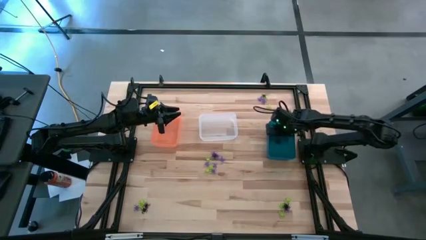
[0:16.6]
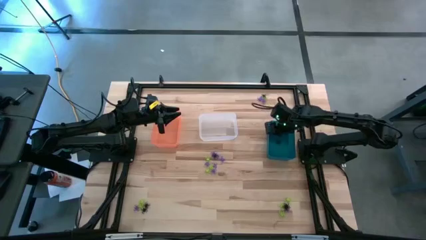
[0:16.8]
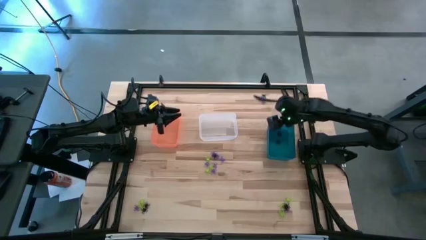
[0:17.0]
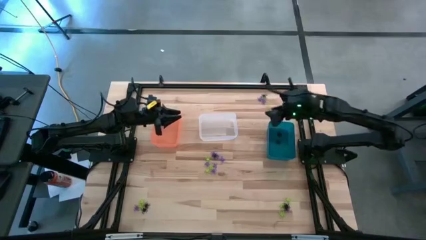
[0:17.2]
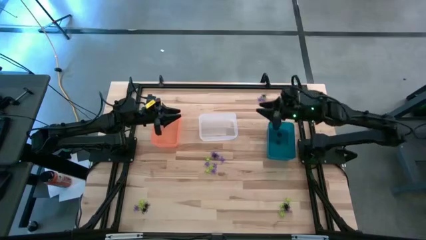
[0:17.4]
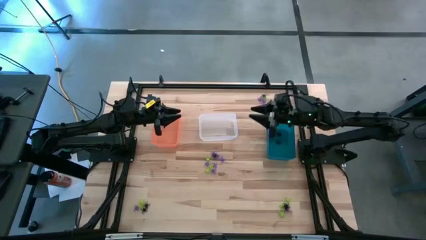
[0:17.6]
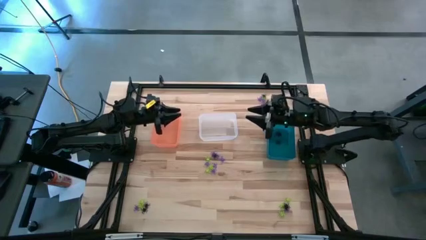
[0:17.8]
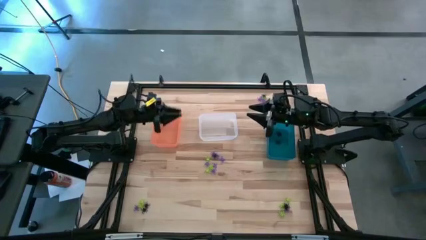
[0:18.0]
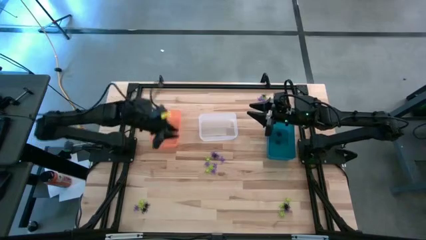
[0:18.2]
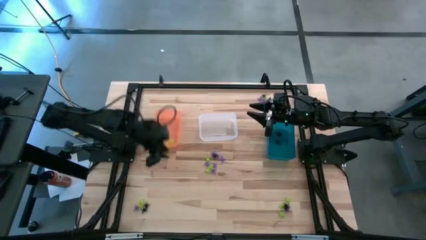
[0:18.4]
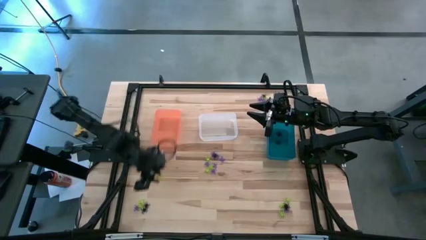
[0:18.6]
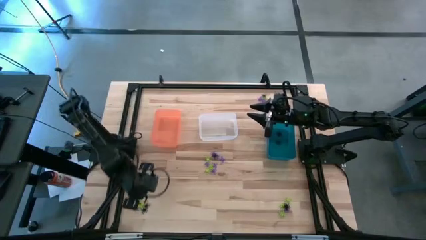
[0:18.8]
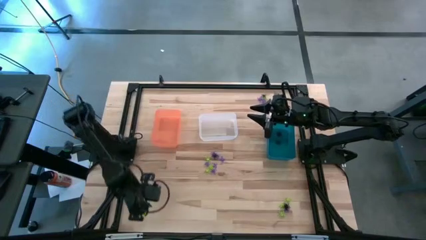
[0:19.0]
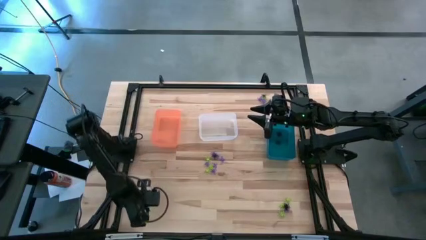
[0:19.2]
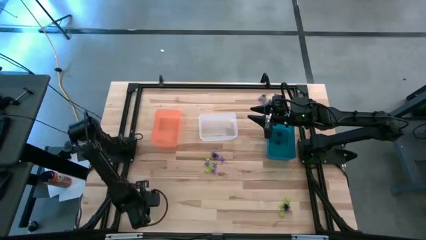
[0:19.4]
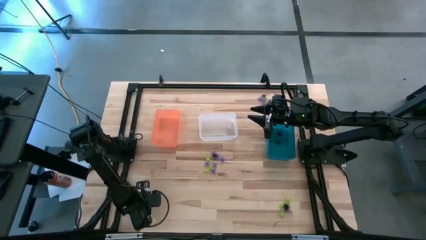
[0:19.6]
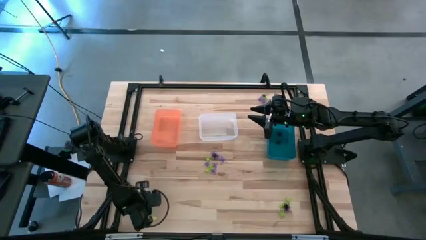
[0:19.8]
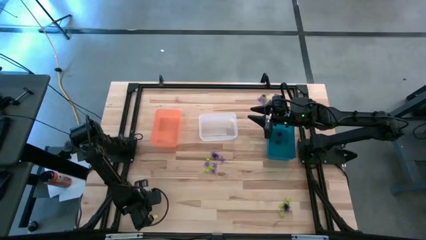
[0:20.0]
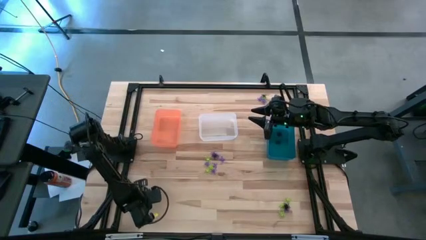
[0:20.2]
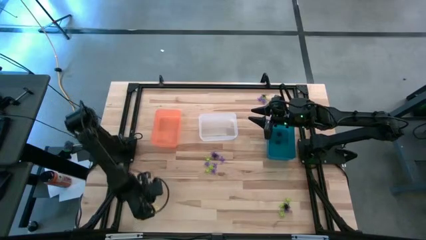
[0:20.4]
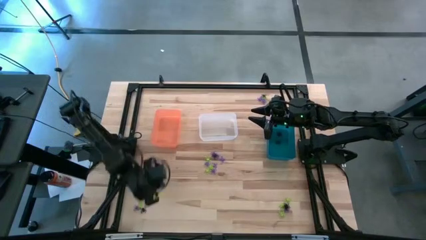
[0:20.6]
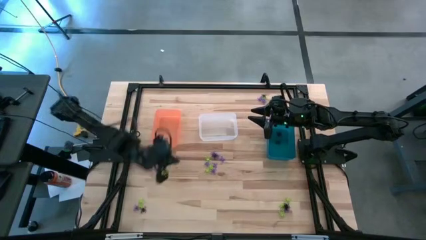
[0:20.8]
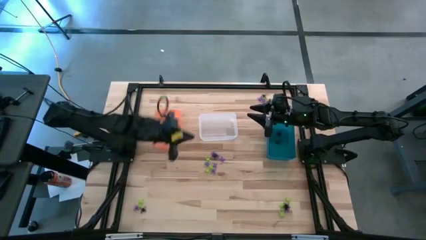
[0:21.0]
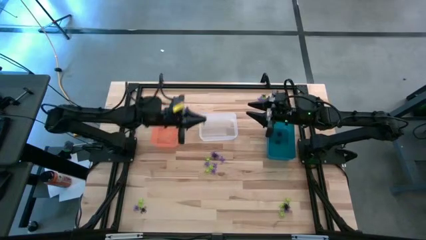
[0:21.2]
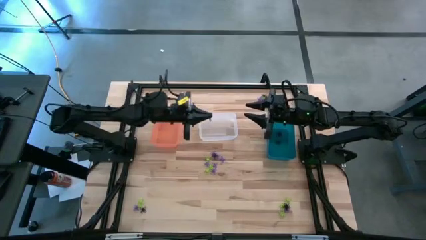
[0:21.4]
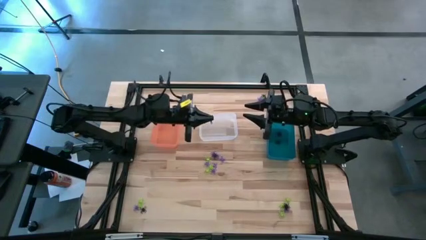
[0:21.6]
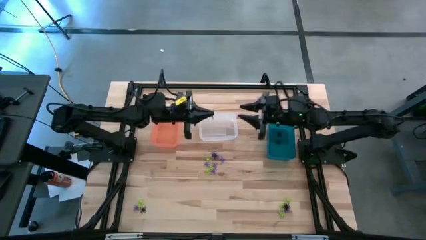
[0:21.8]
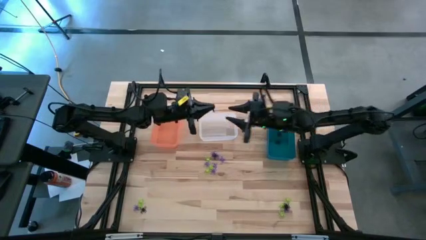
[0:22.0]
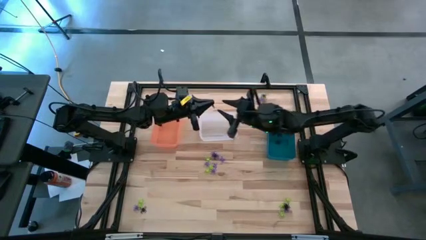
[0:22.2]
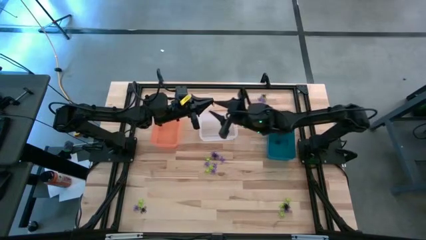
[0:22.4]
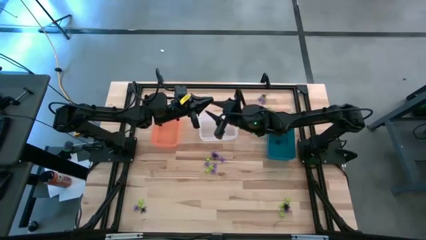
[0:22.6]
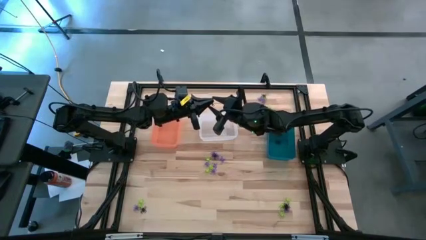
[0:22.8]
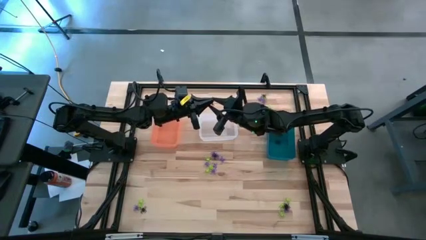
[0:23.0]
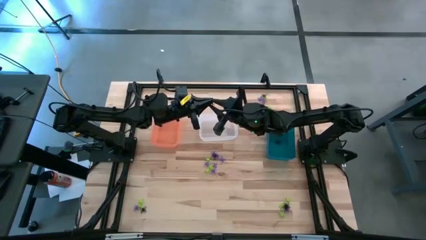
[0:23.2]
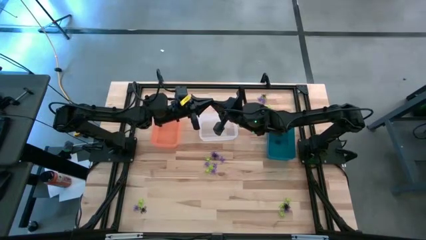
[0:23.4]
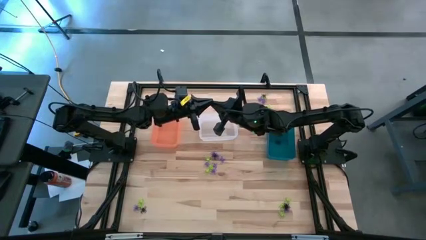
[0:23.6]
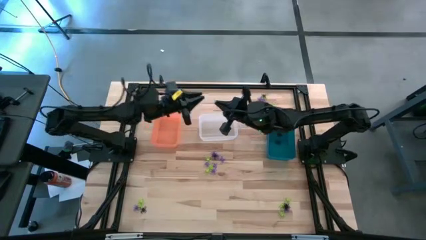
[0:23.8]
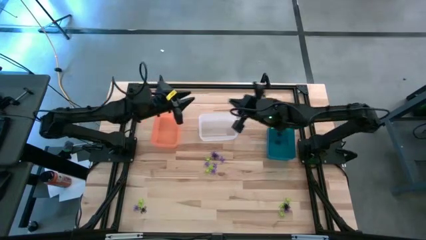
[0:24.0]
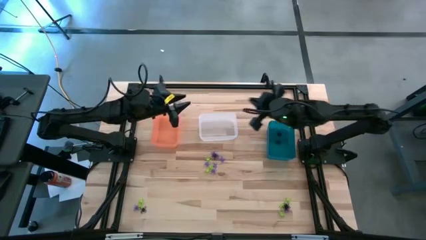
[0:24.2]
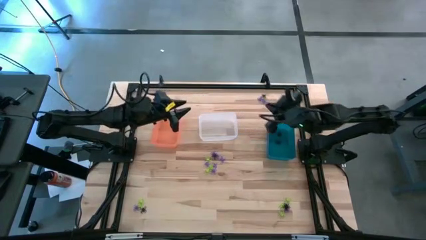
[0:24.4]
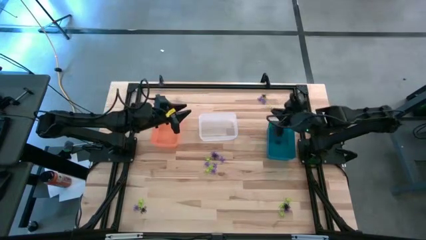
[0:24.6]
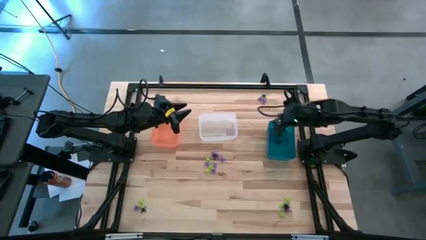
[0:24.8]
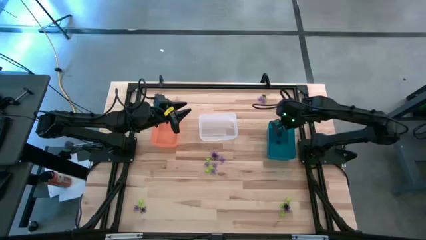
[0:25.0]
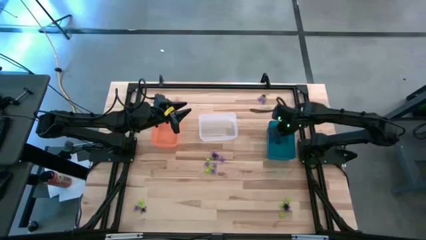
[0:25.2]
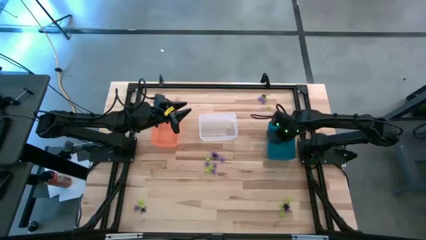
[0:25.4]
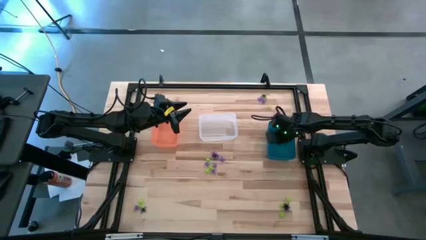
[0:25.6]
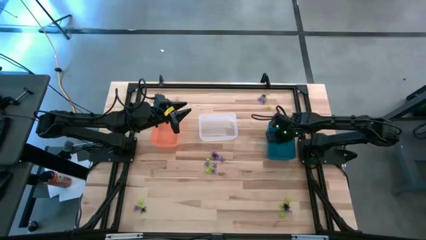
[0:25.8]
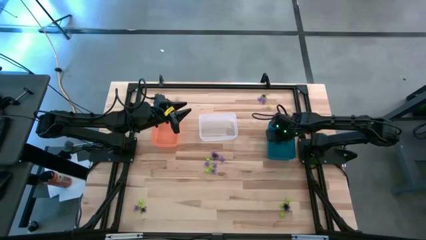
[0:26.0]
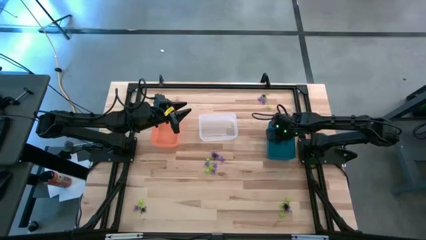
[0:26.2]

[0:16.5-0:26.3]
Task: Sort Halloween decoration
Put the black spider toy into the blue bin

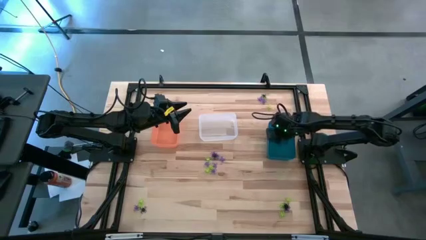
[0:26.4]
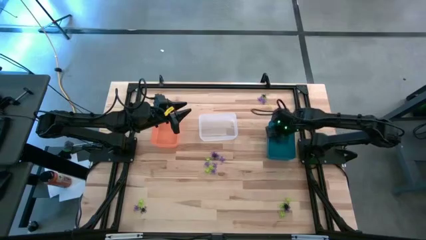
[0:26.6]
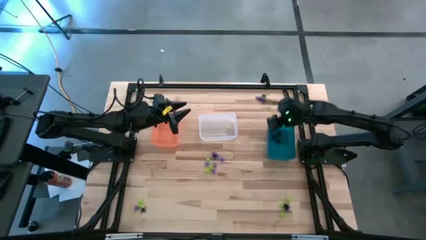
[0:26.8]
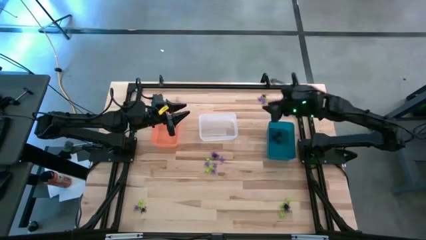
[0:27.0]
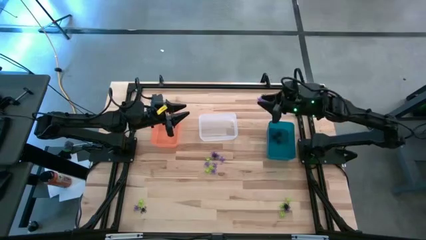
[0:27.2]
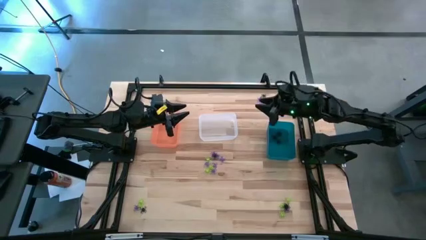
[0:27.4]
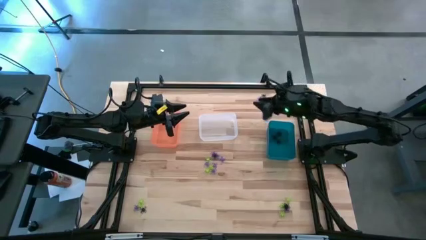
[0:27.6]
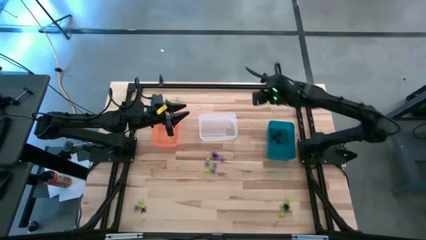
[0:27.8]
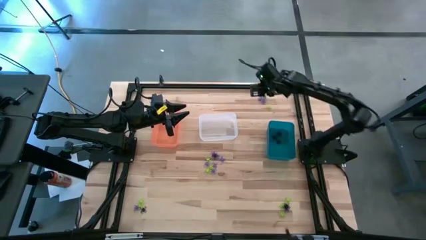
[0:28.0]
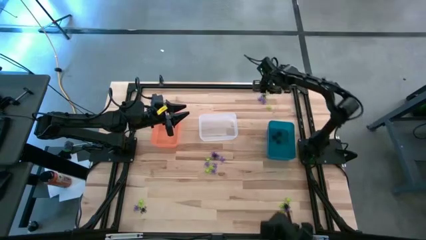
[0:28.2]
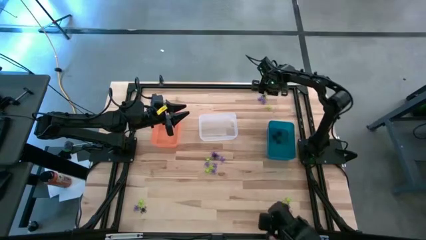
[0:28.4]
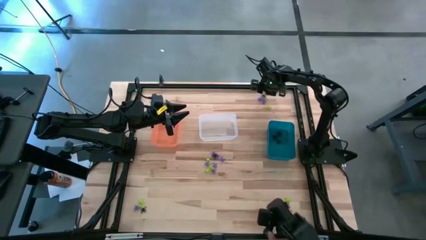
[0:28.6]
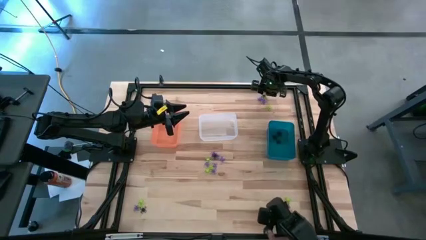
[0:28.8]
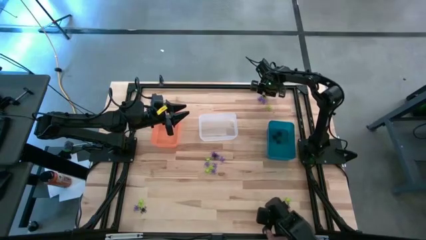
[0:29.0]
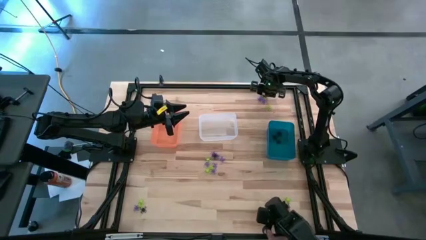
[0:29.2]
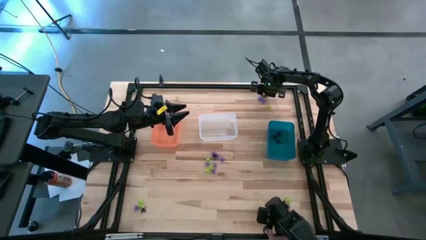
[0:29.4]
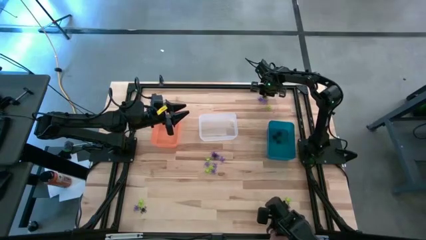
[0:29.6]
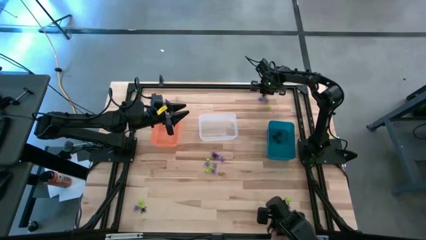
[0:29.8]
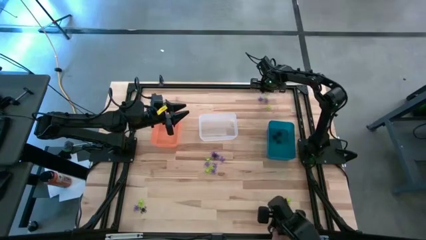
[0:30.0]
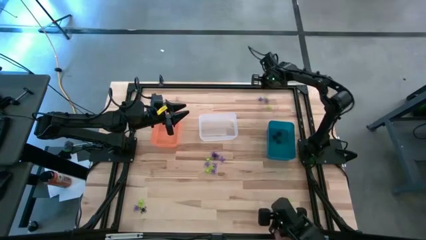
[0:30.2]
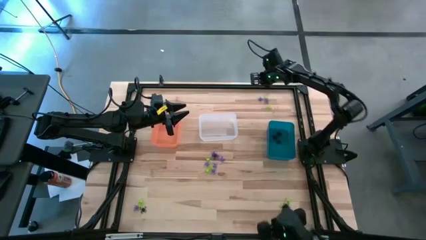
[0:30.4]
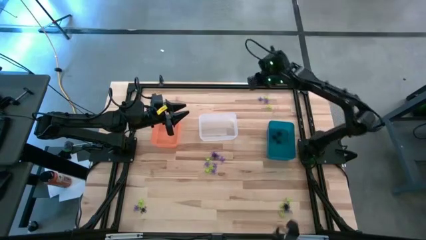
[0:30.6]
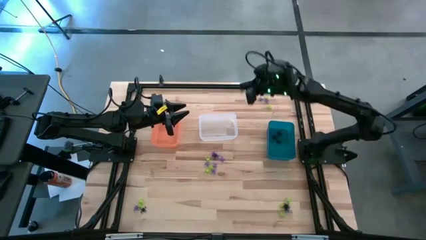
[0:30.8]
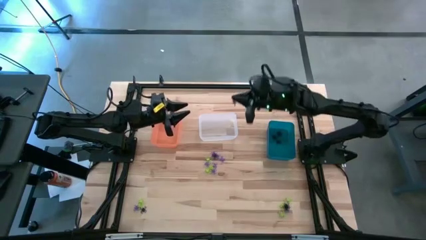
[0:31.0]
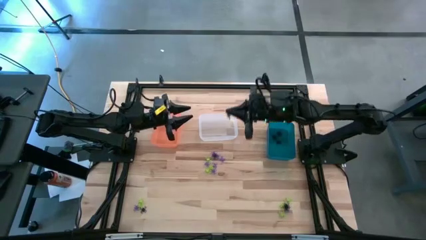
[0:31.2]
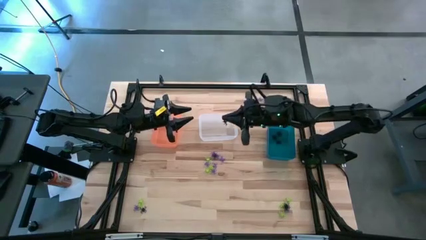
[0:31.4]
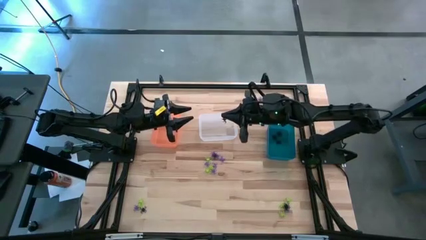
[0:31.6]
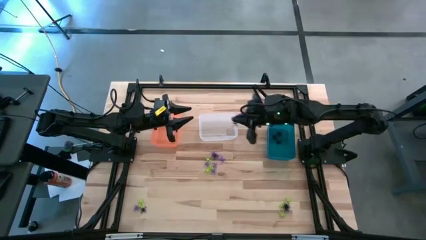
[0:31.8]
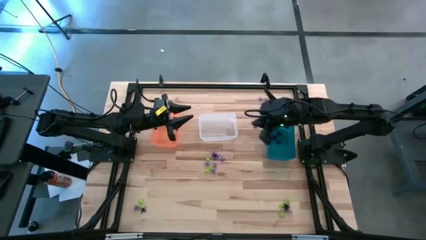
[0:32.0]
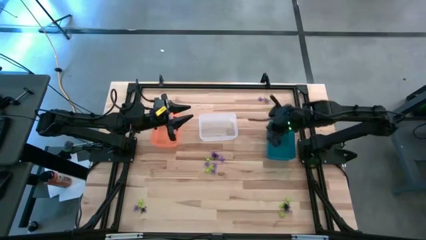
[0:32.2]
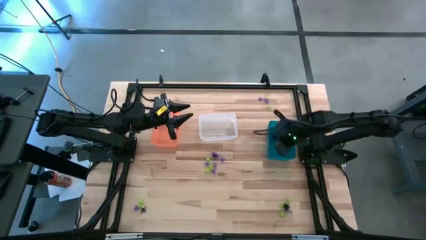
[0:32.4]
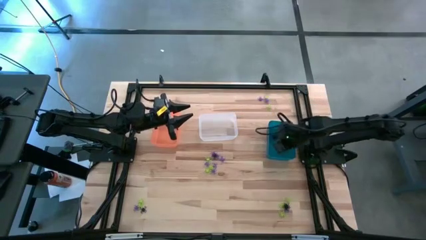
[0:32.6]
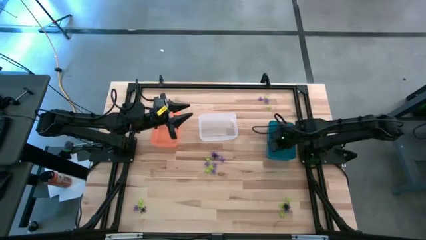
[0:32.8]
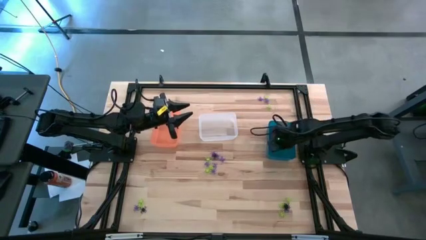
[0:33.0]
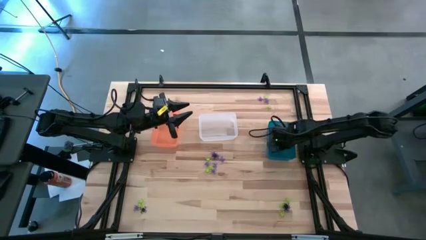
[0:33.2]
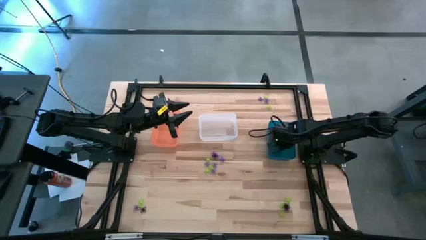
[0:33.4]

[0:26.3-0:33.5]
Put the black spider toy into the blue bin
